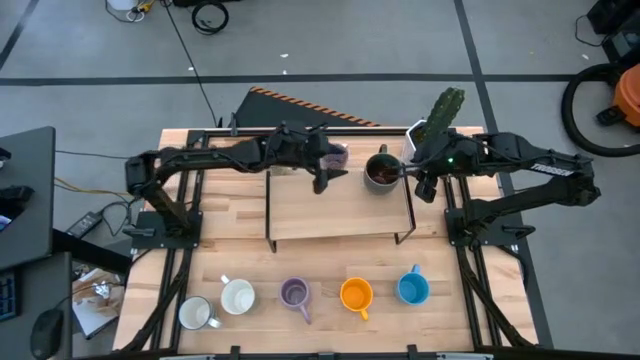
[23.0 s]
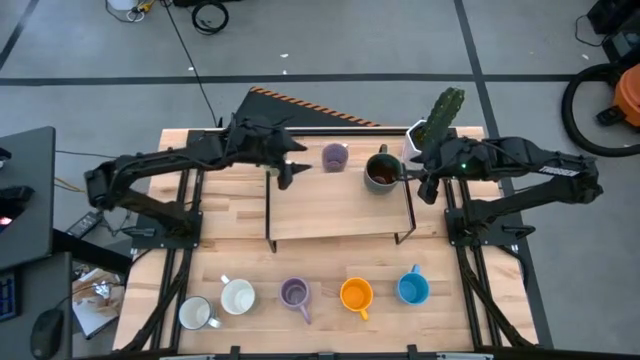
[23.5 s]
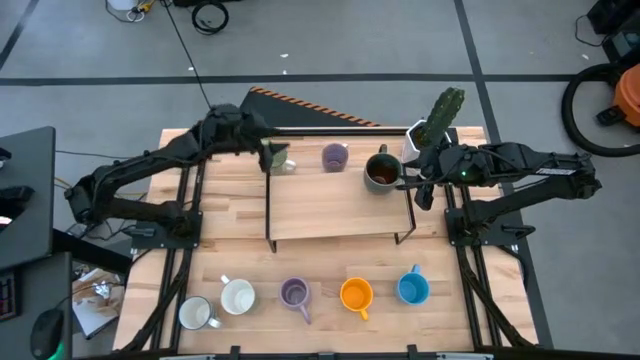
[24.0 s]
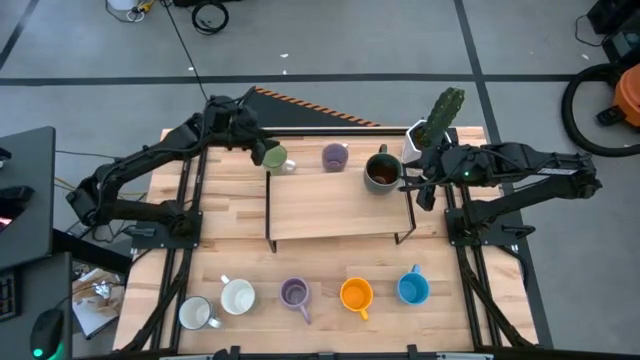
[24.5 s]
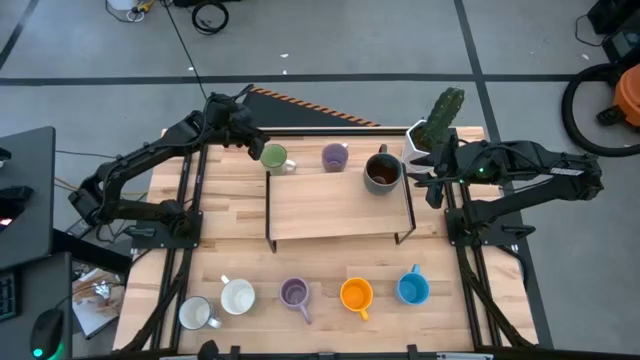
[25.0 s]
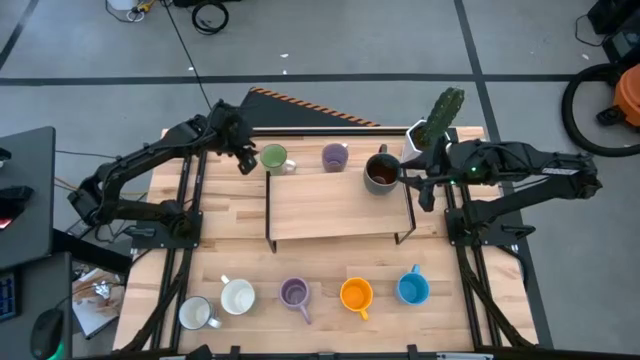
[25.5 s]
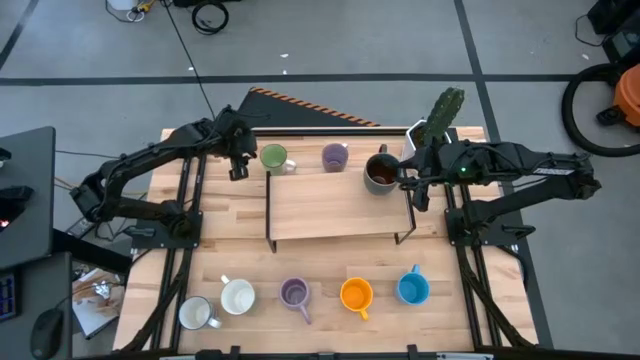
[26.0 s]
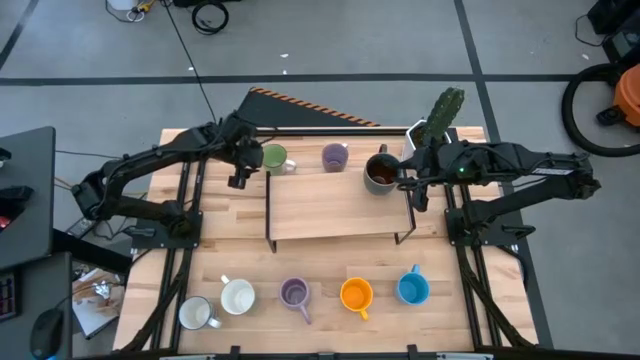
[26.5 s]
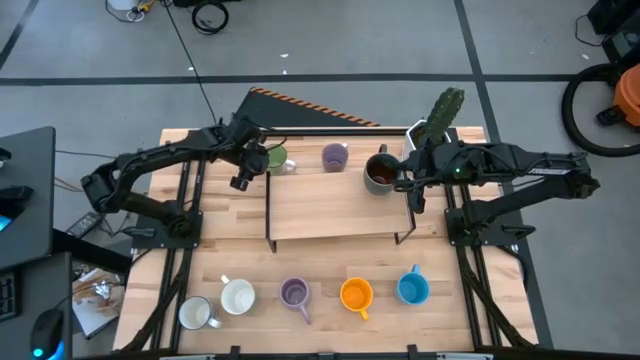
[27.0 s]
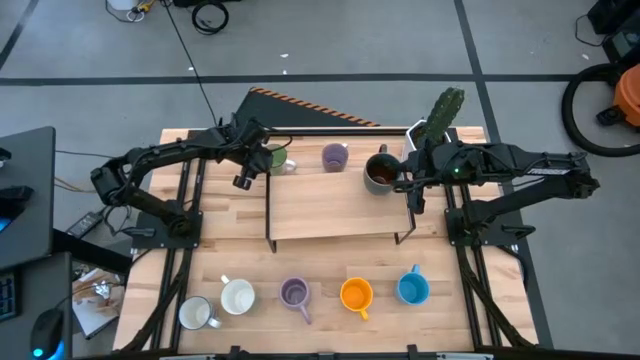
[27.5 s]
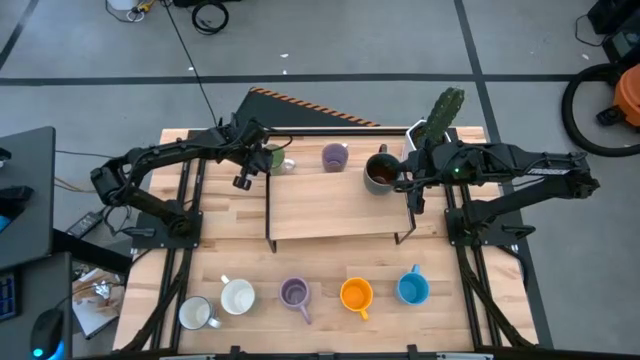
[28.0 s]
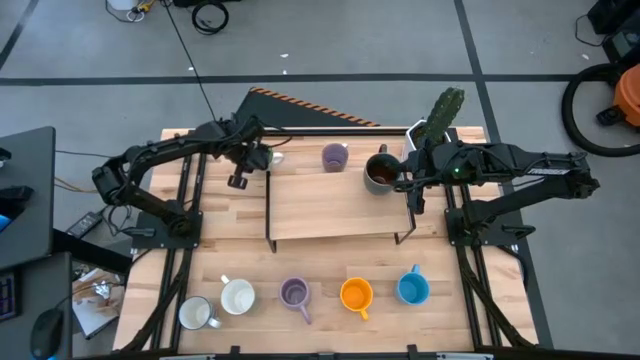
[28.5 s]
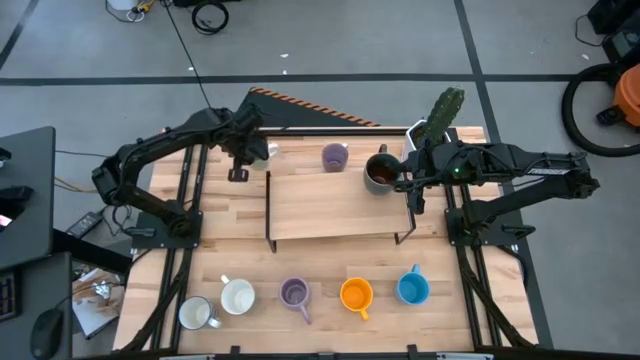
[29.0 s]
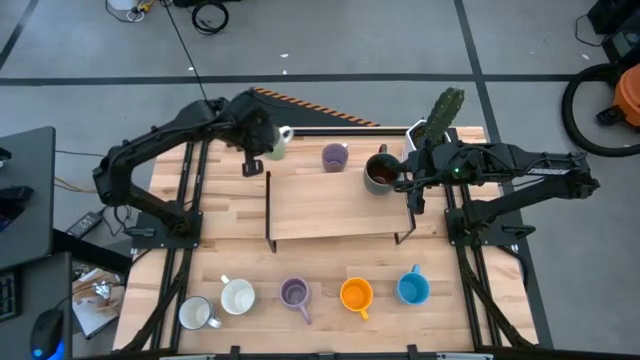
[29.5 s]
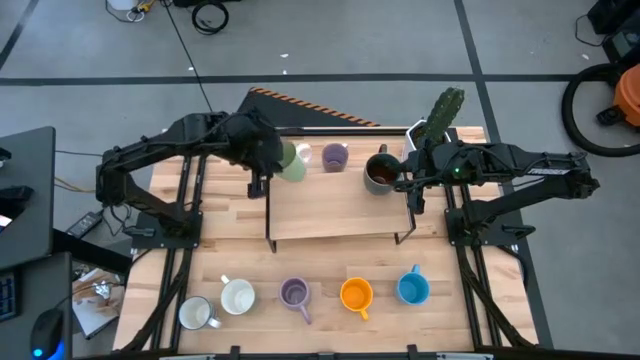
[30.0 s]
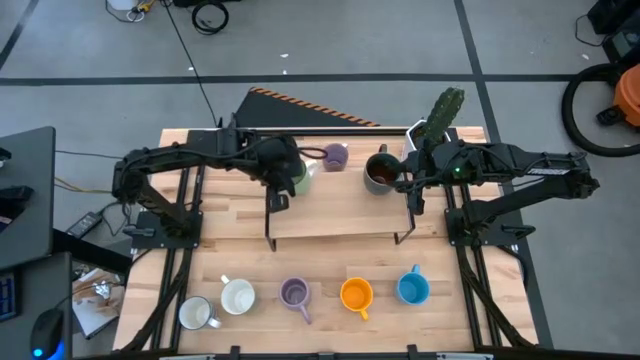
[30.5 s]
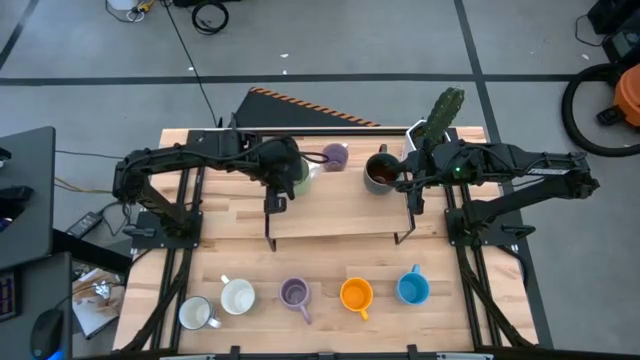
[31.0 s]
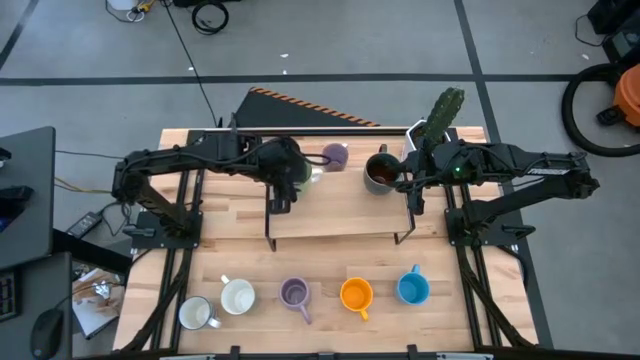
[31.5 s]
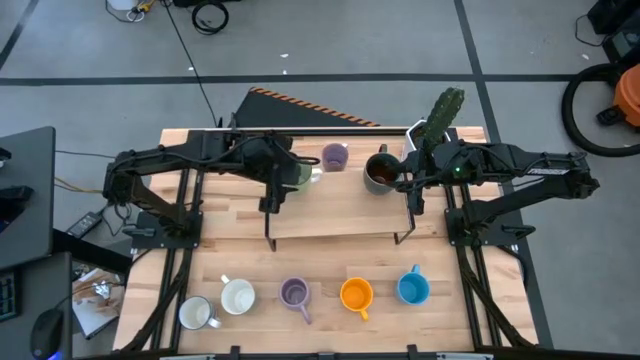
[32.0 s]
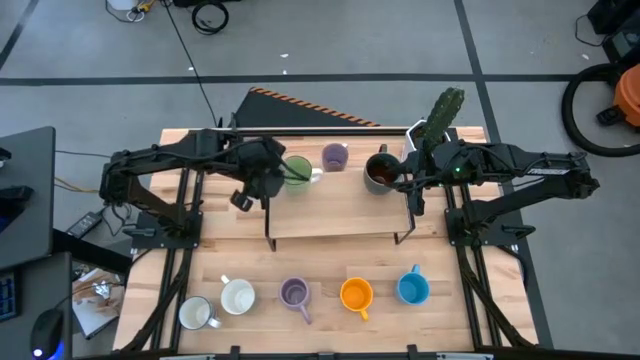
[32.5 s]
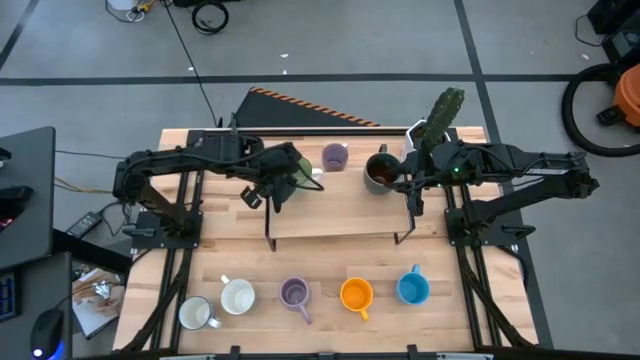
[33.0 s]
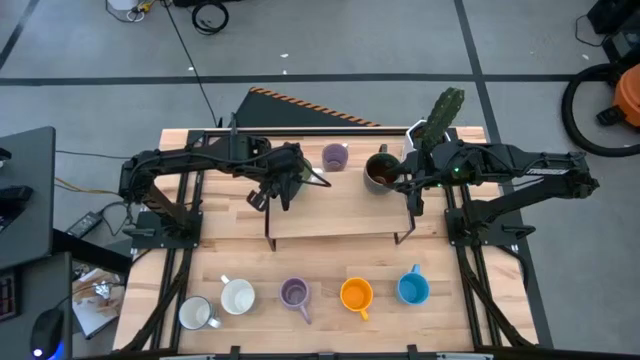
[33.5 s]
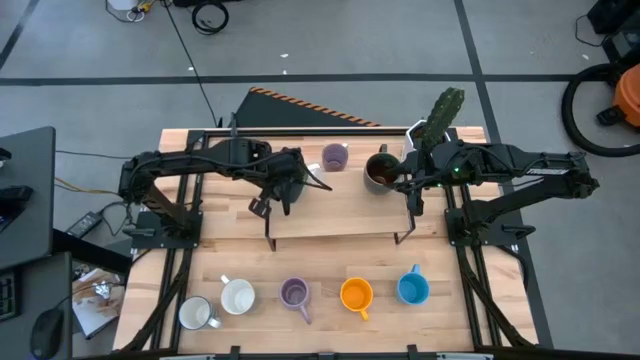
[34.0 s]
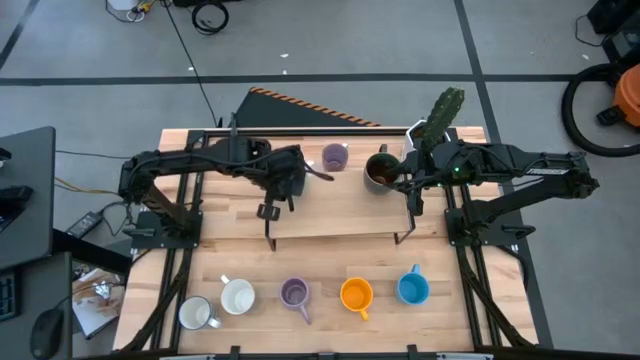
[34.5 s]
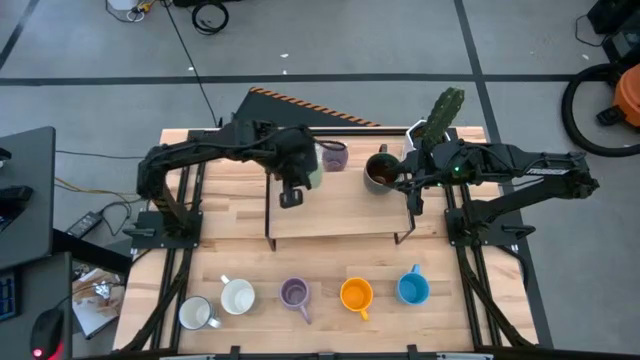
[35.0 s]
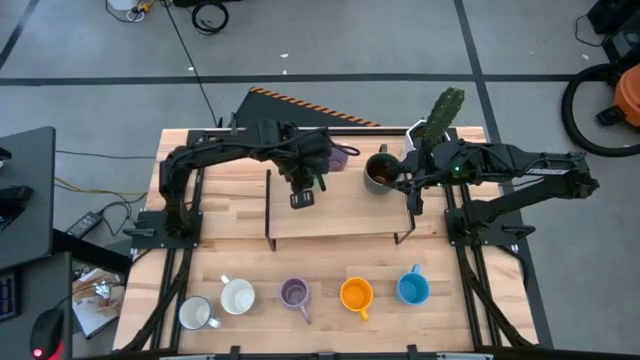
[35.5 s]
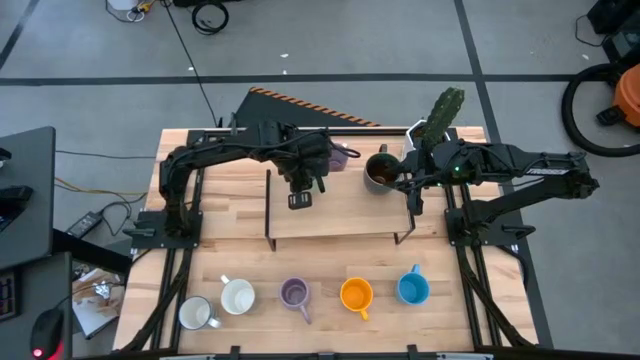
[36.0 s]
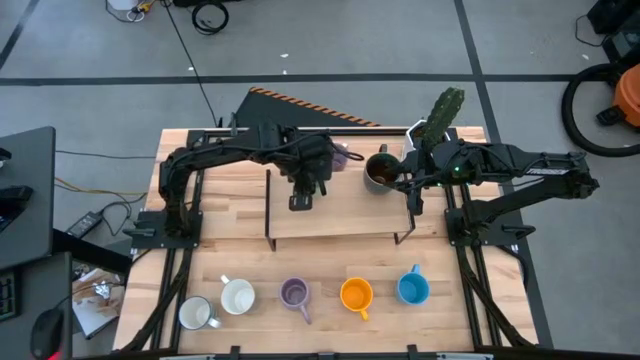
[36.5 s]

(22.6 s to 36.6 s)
Task: Place coffee mugs
Put the green mug on the shelf
